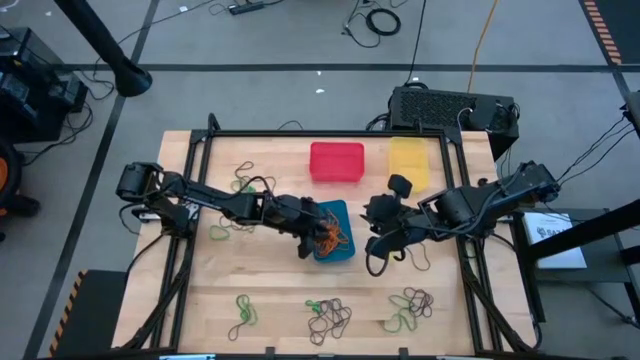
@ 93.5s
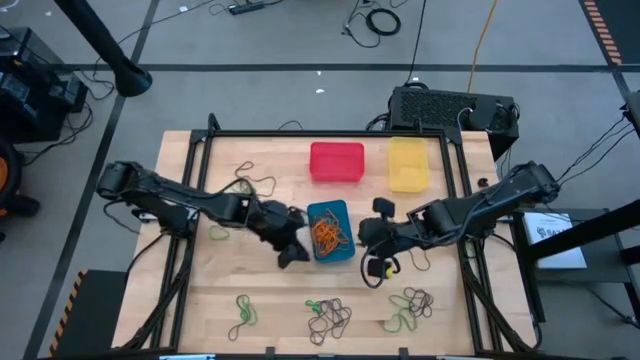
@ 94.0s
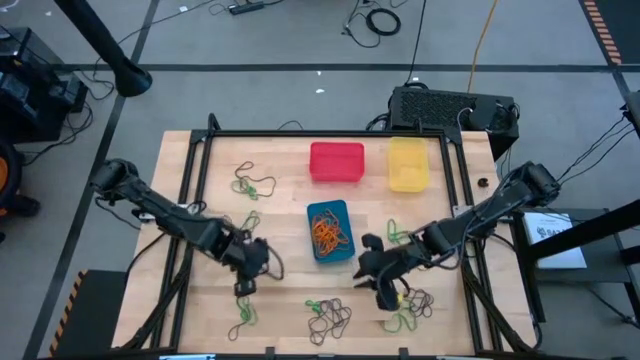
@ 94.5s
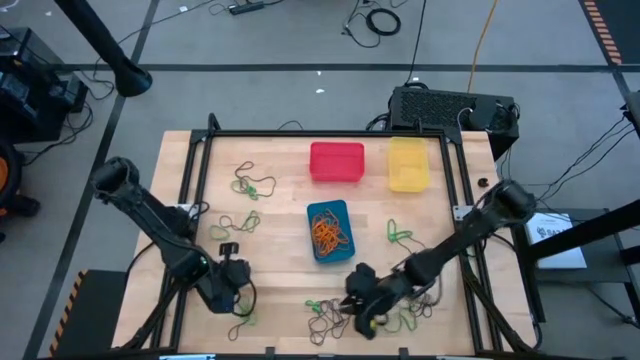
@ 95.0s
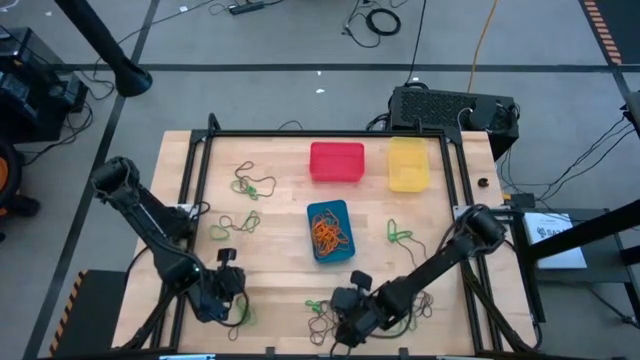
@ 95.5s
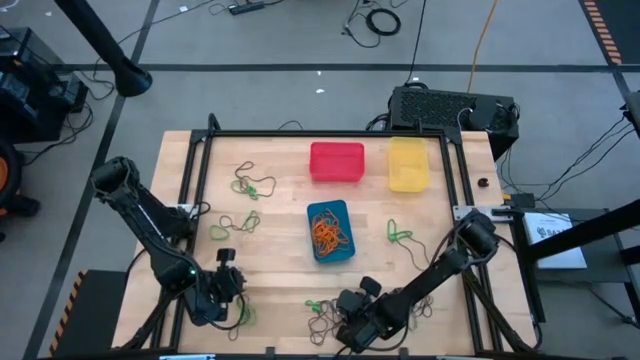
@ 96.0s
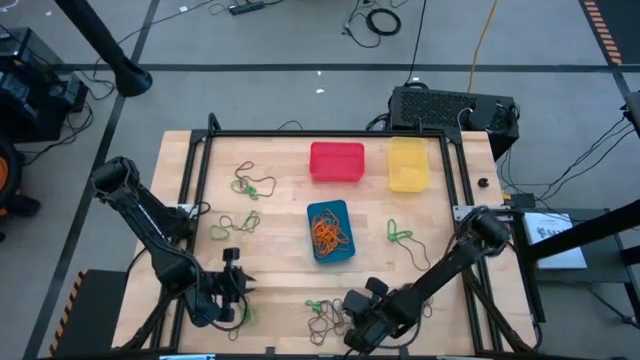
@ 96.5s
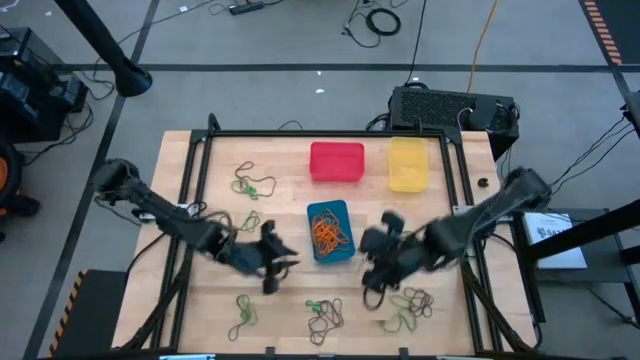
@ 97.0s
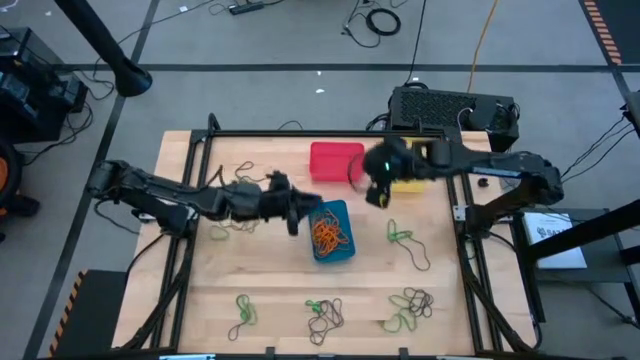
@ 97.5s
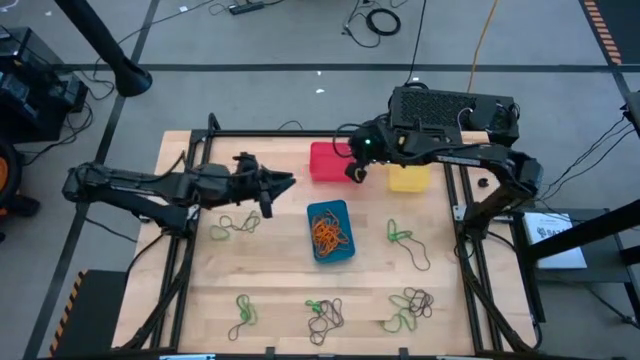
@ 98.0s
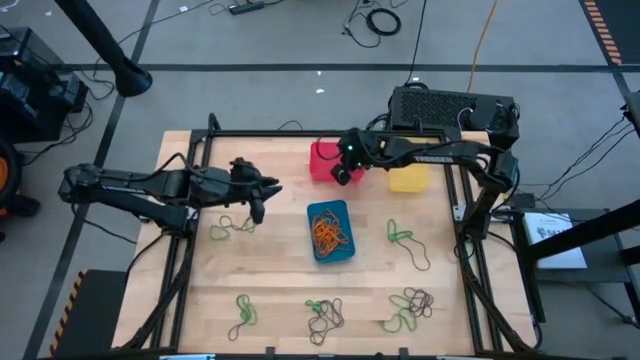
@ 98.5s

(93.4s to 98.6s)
Task: Sort rubber bands into baskets
Put the purple rubber band into the red bin

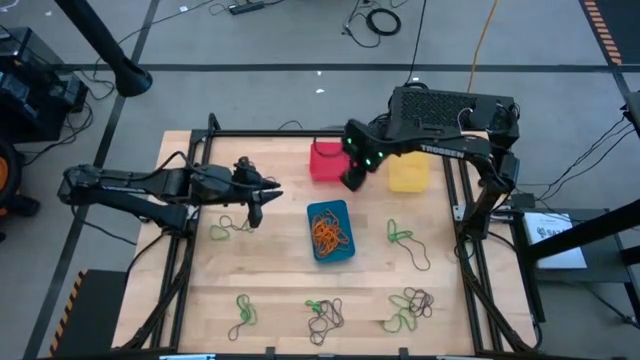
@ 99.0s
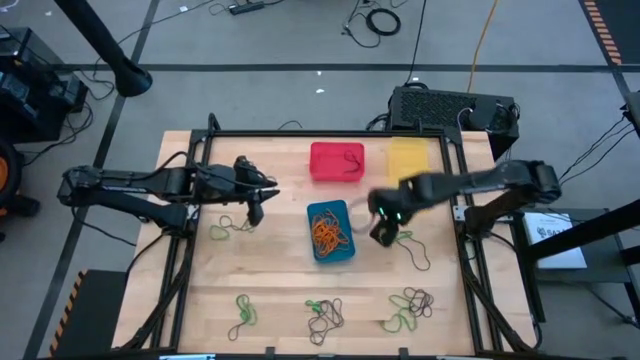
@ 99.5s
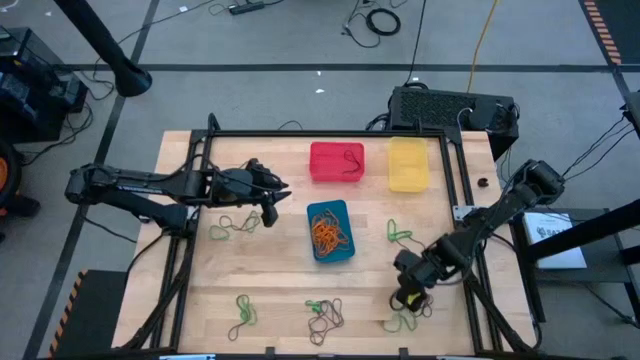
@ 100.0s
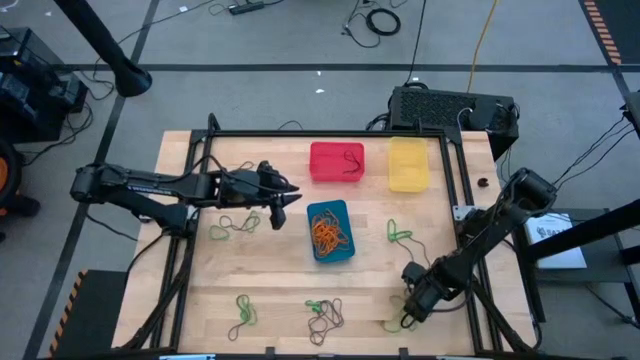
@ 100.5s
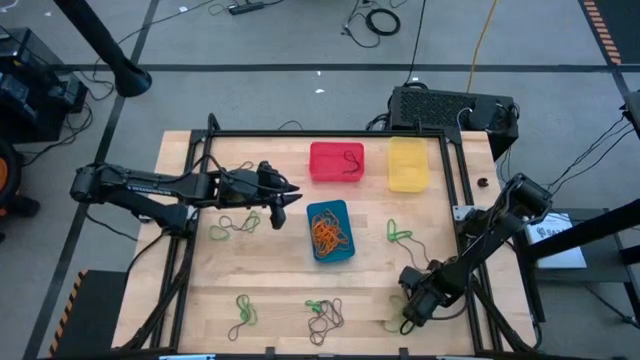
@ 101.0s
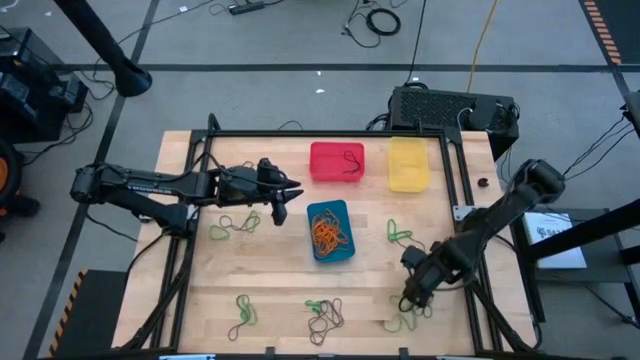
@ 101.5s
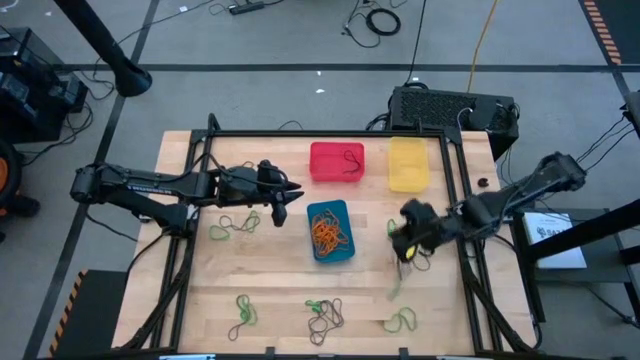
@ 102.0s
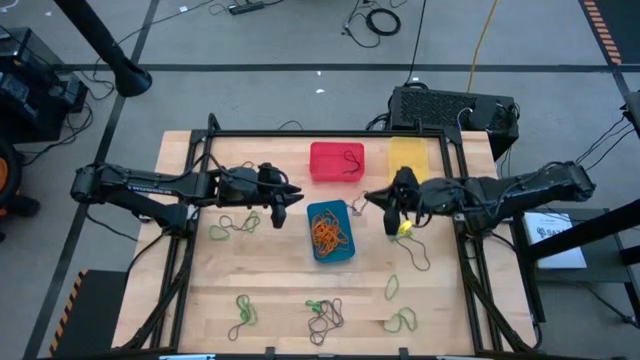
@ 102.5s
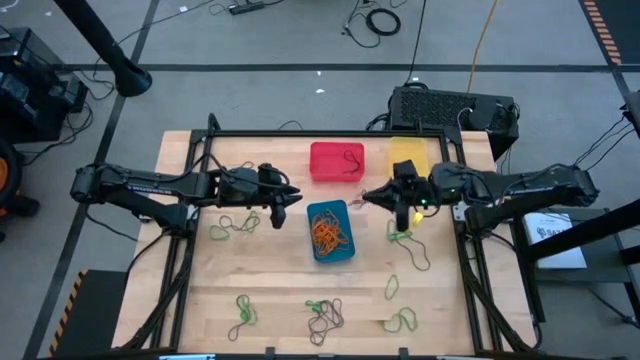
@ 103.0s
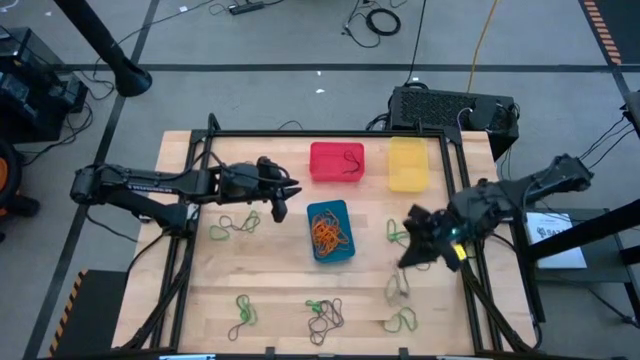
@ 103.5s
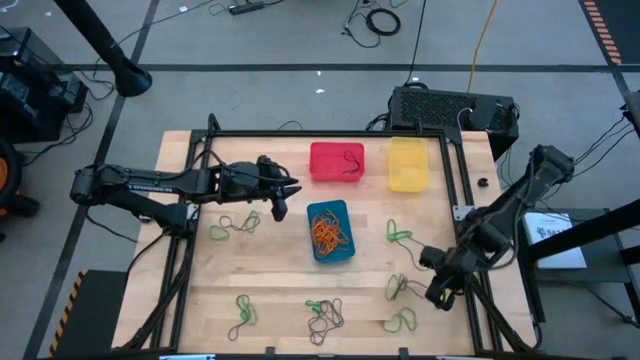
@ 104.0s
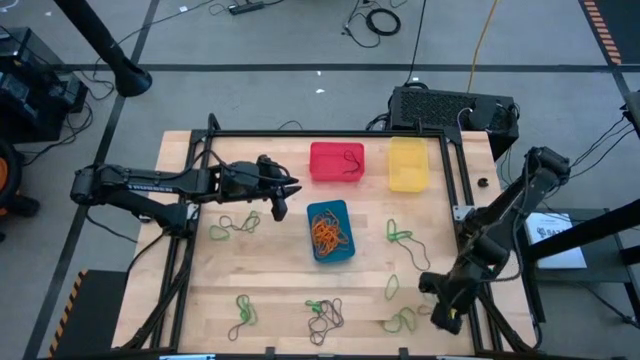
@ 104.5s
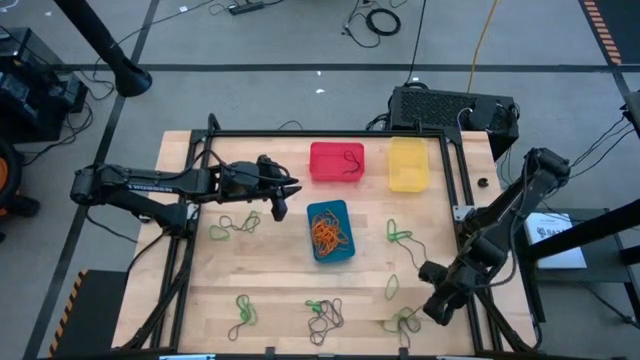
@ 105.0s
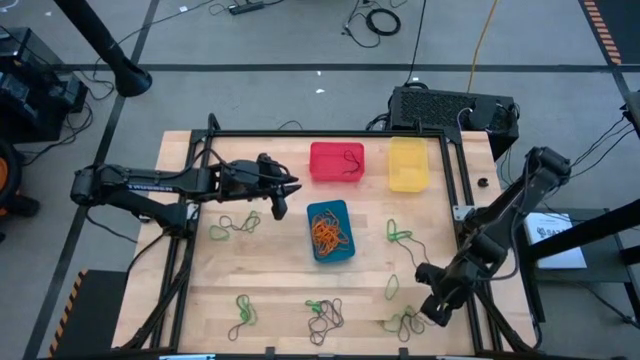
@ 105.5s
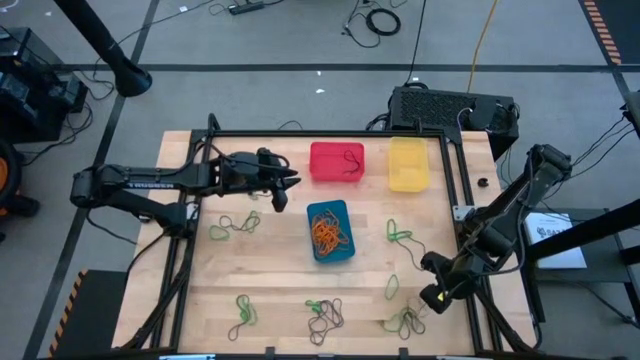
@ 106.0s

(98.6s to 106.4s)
Put the purple rubber band into the red bin

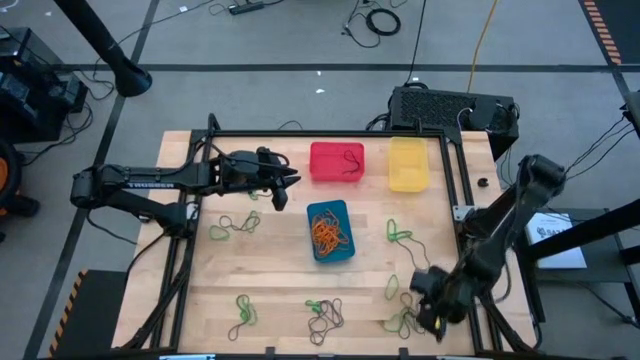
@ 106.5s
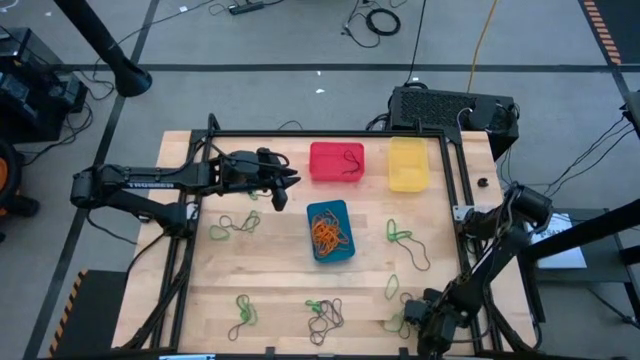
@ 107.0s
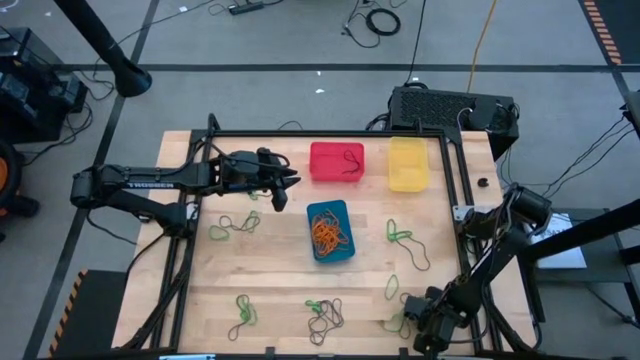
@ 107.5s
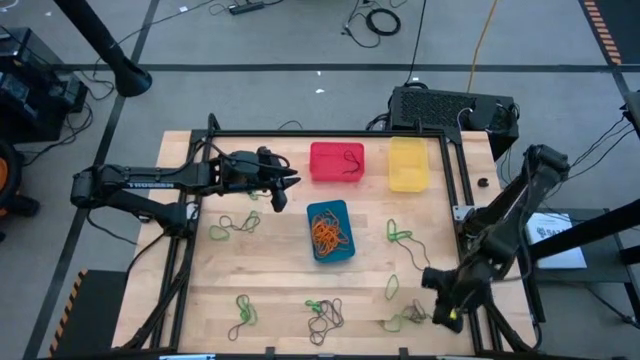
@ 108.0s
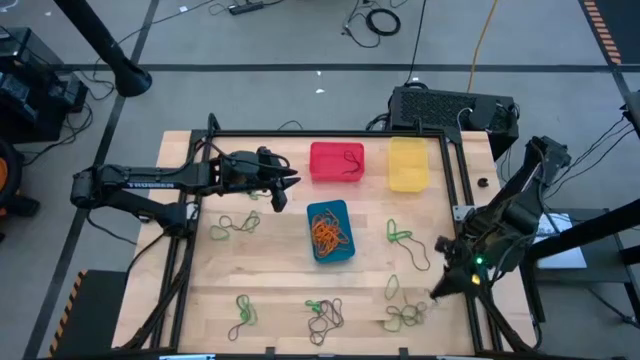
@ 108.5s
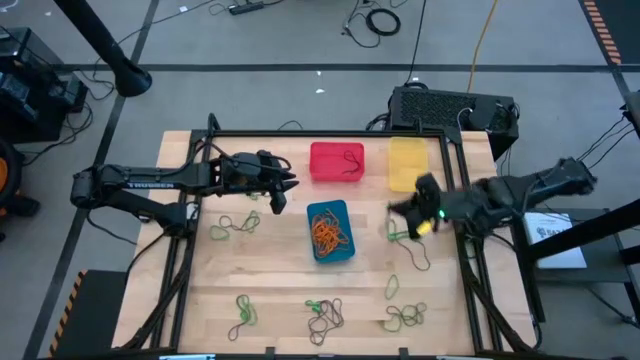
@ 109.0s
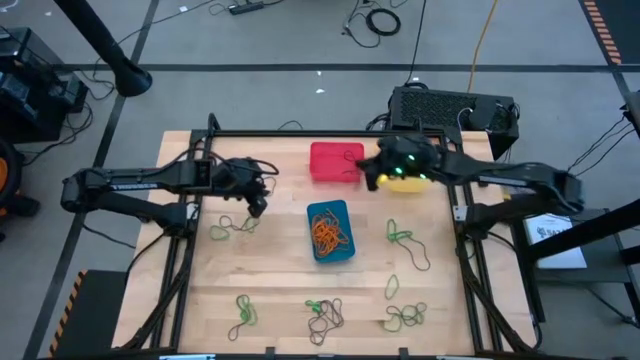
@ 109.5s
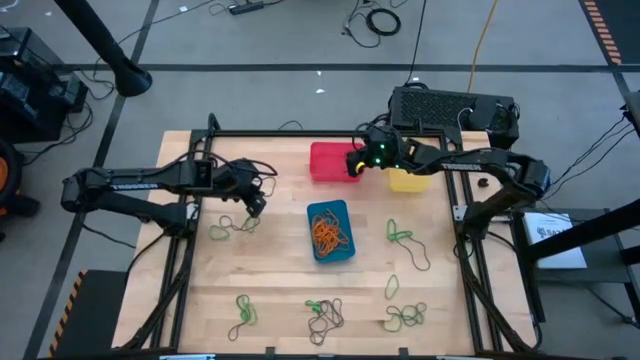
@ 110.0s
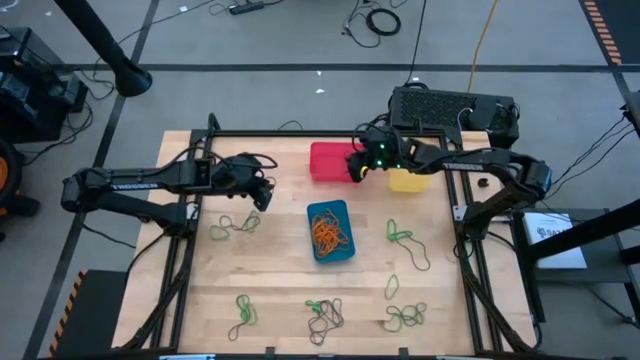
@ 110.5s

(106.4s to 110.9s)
Put the purple rubber band into the red bin

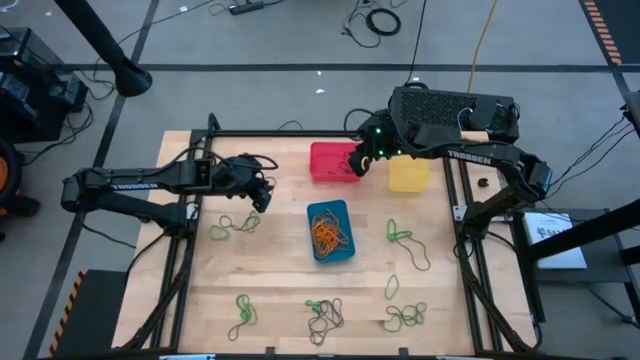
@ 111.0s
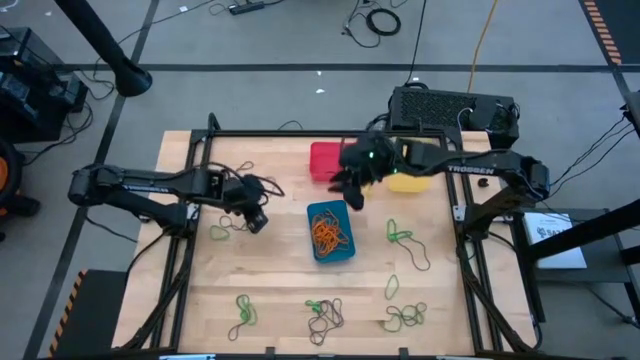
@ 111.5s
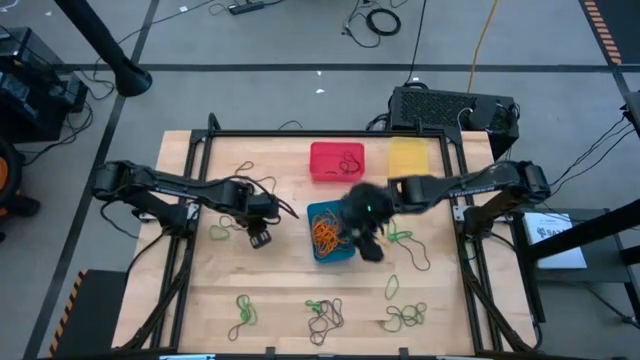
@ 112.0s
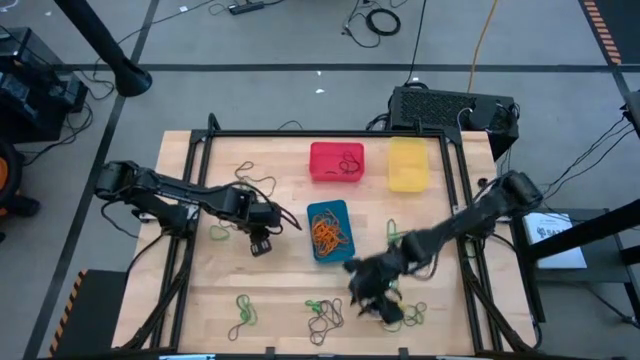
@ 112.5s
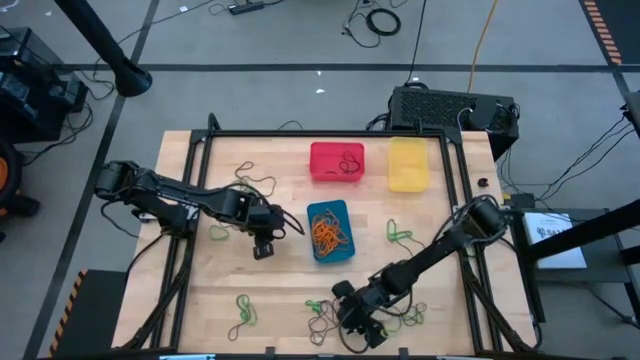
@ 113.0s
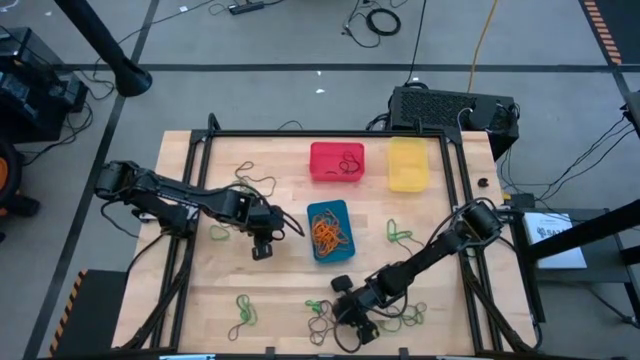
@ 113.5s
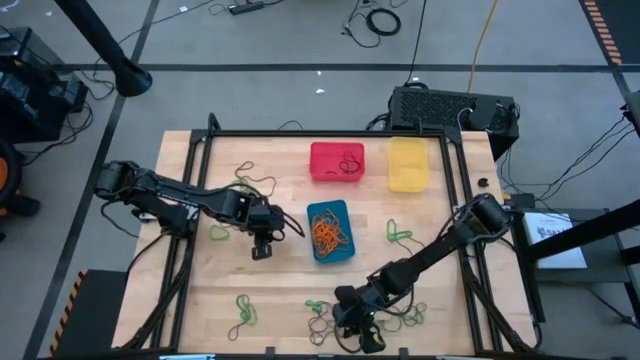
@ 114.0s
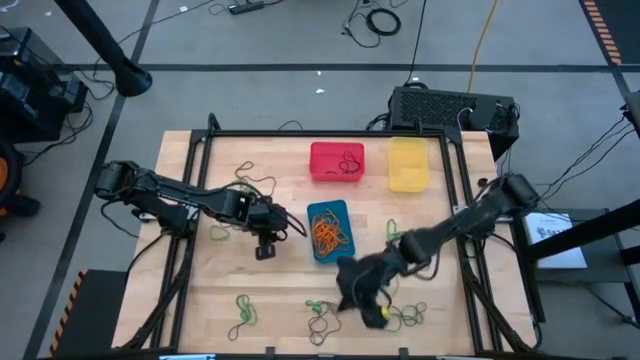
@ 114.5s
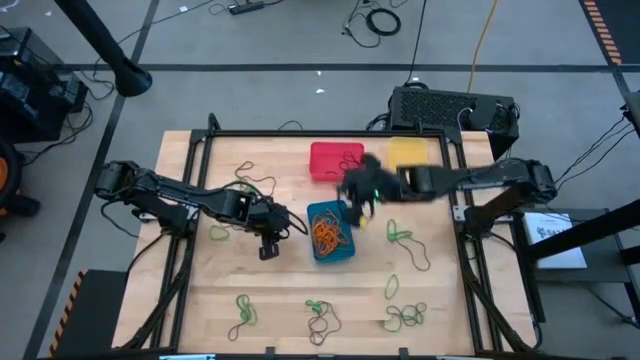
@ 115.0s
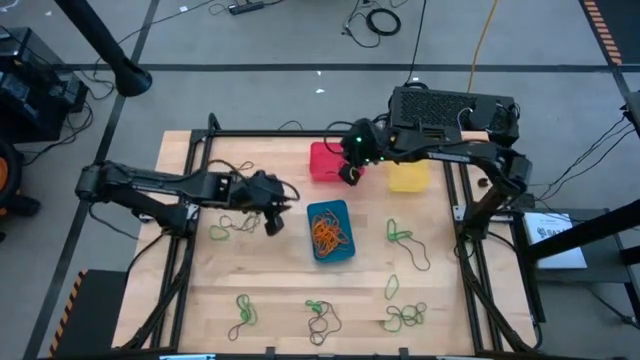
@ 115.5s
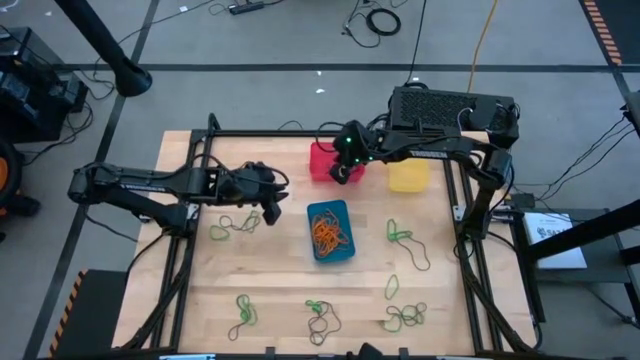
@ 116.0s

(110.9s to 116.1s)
Put the purple rubber band into the red bin
